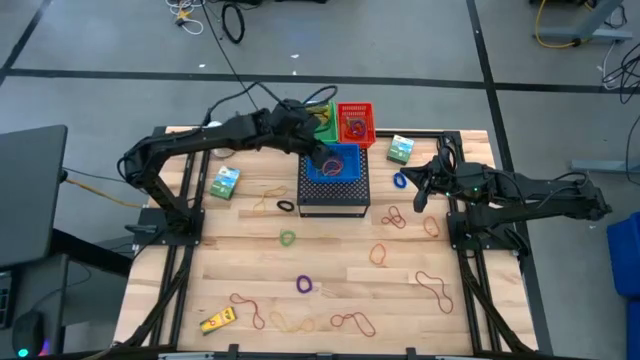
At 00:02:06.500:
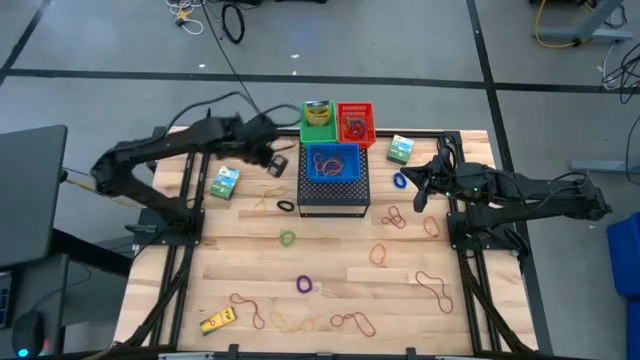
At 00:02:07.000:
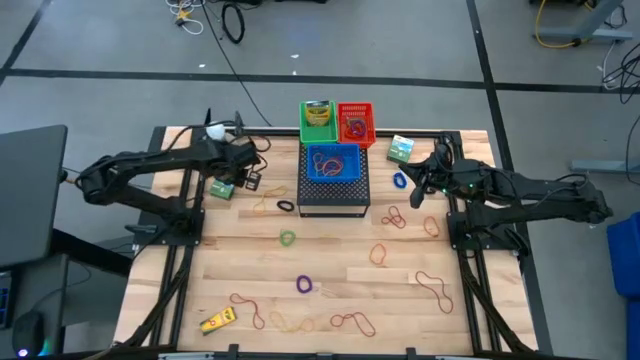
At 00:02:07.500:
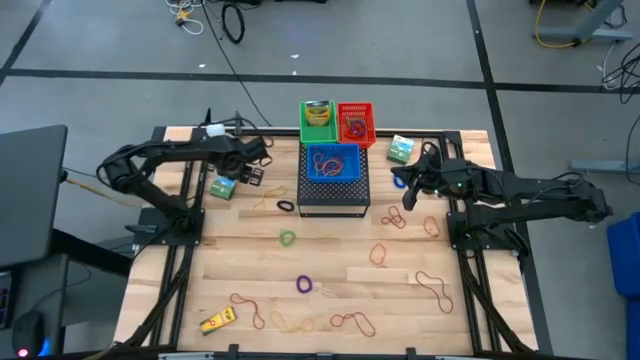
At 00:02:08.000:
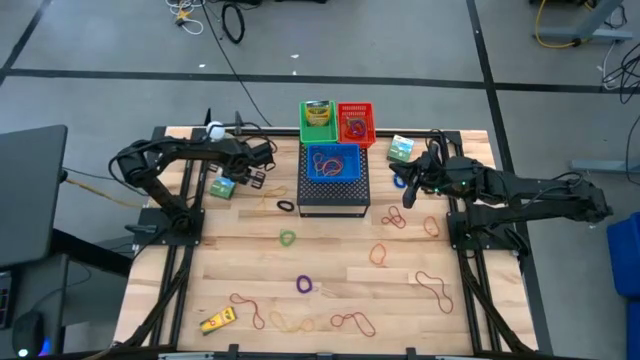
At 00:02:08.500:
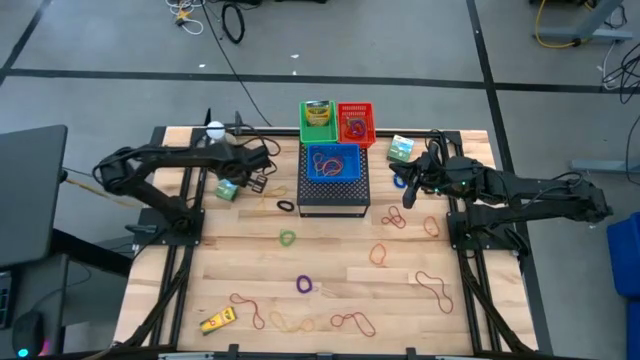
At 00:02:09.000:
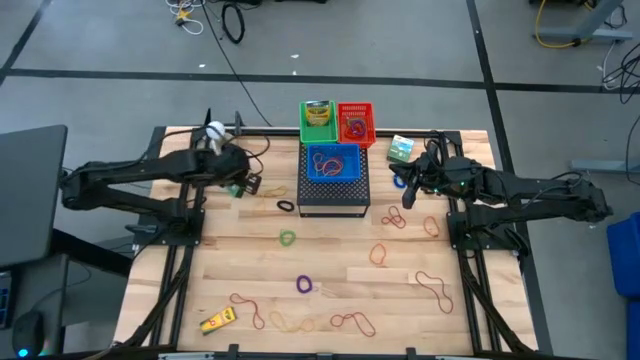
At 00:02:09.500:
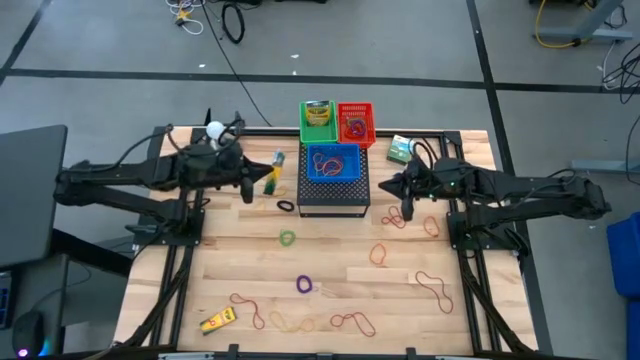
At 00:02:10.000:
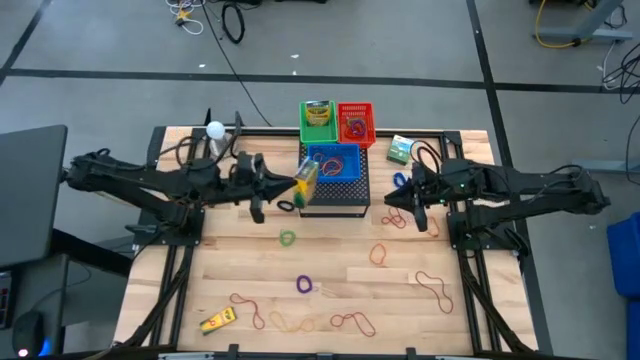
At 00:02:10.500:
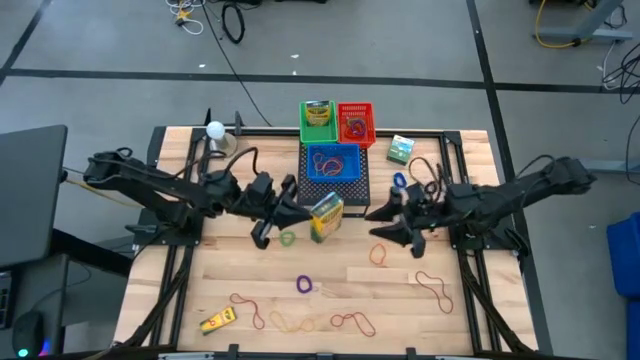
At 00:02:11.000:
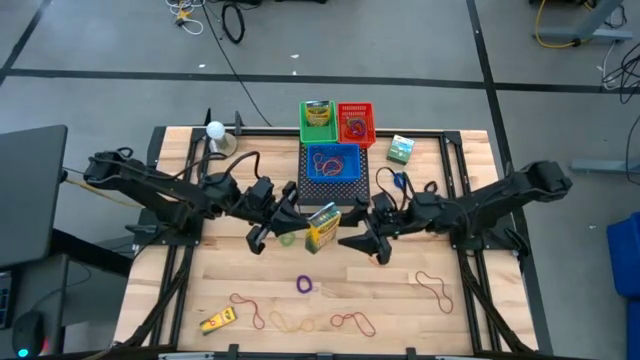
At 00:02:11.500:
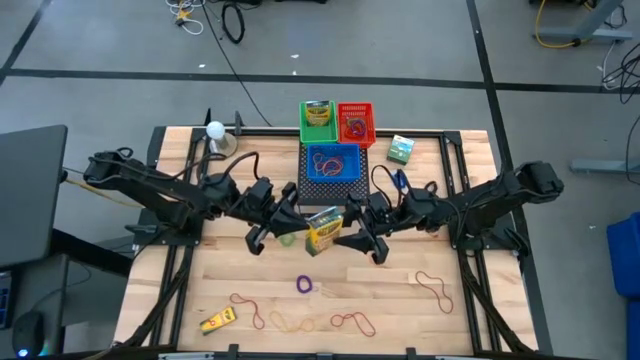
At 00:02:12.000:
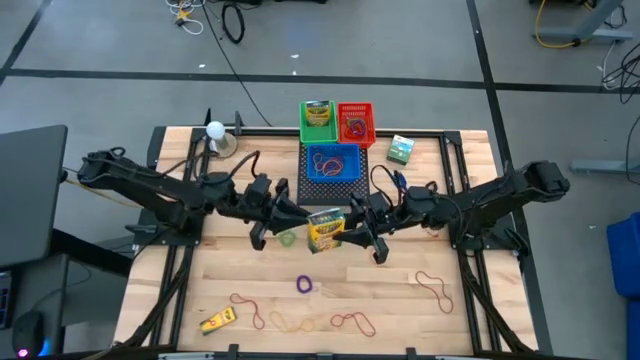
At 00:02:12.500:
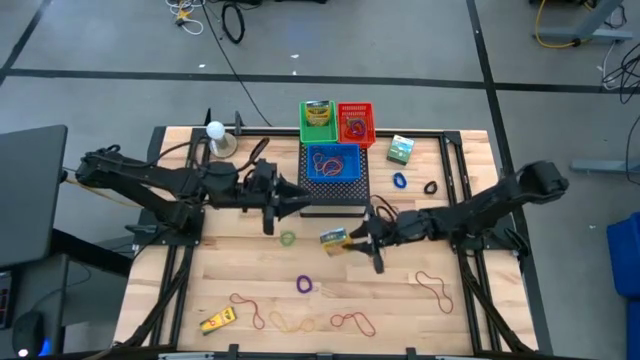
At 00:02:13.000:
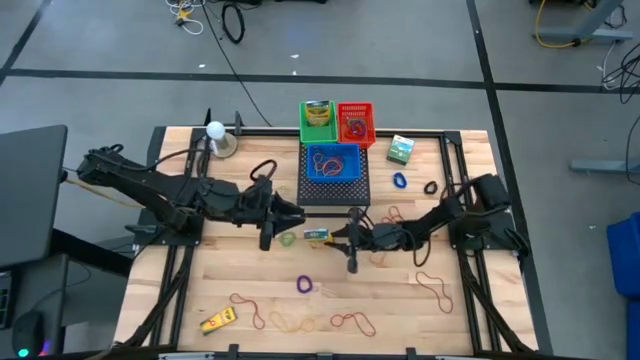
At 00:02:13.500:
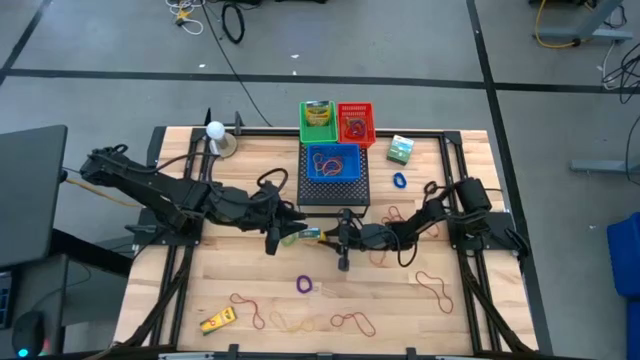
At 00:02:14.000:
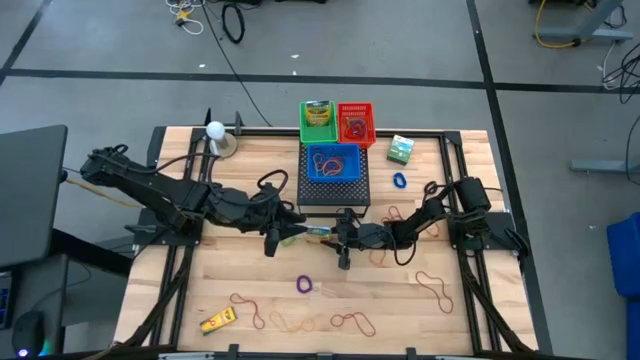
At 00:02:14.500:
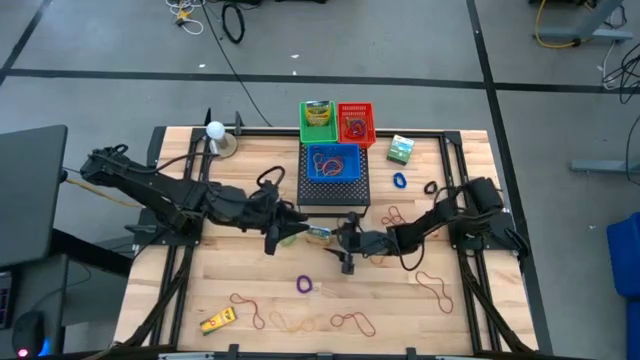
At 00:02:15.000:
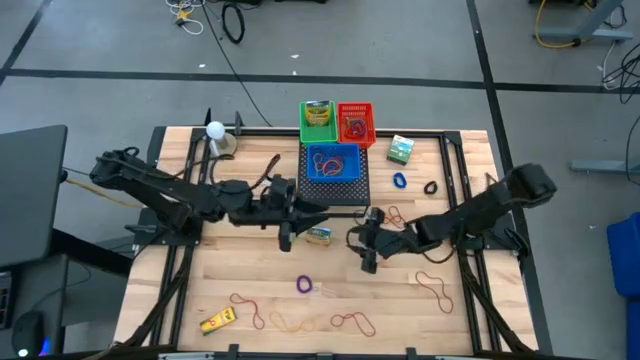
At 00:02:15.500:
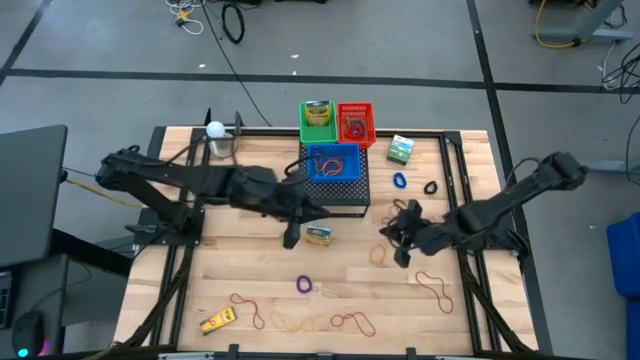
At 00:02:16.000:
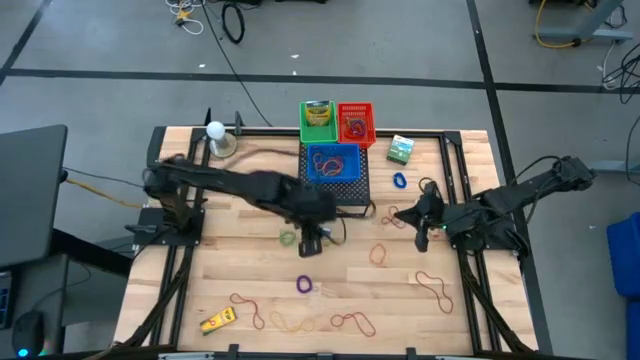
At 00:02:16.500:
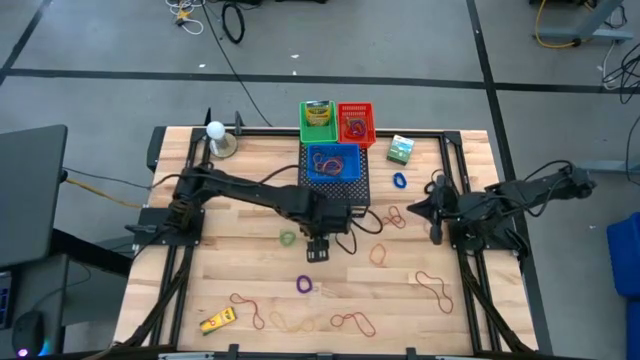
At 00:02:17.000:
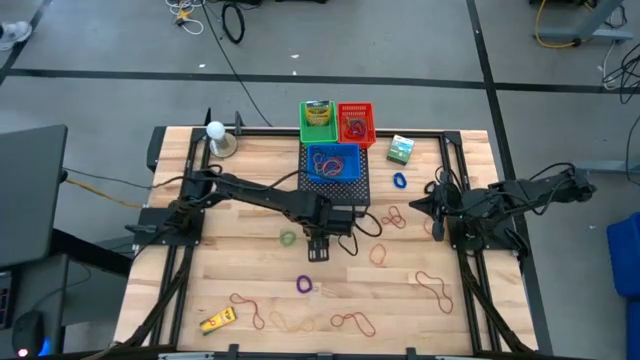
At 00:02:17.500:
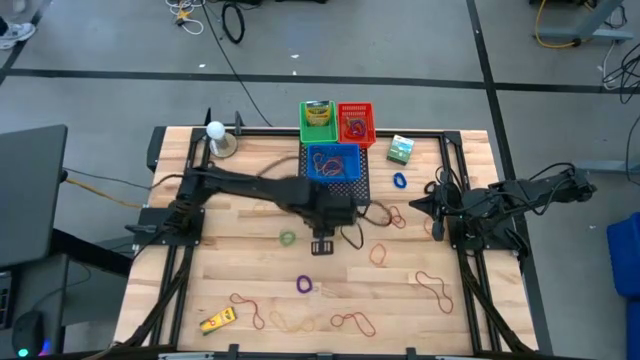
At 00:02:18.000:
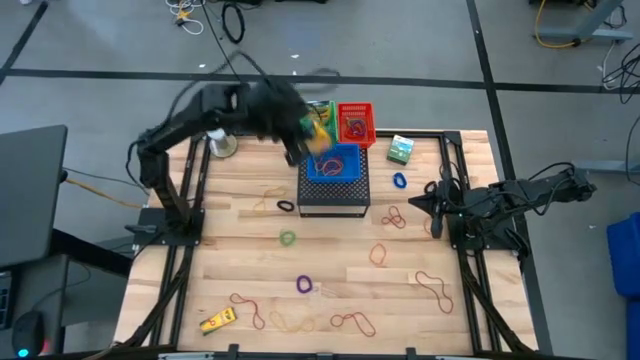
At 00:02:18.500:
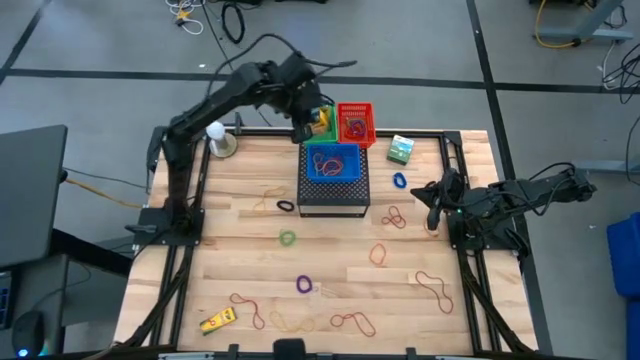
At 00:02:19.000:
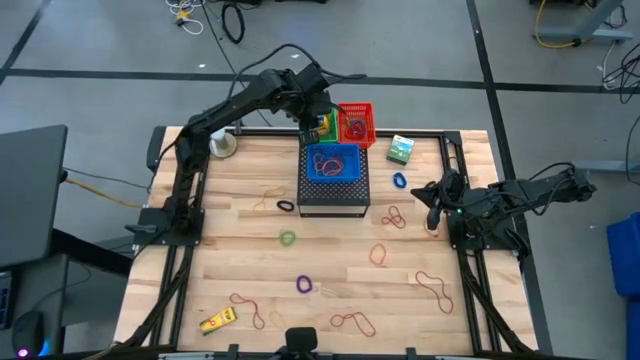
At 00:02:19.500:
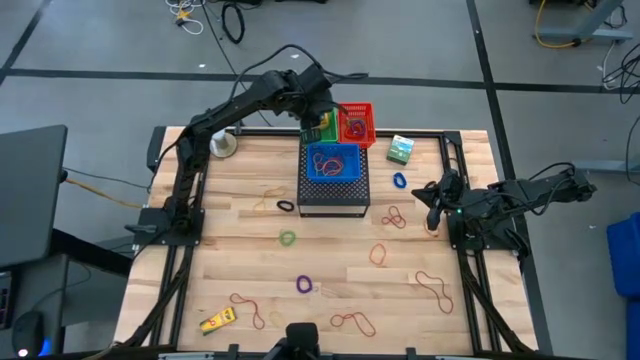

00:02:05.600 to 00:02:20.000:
Task: Pick & Place Office Desk Supplies
Put the box of crayon into the green bin on the shelf

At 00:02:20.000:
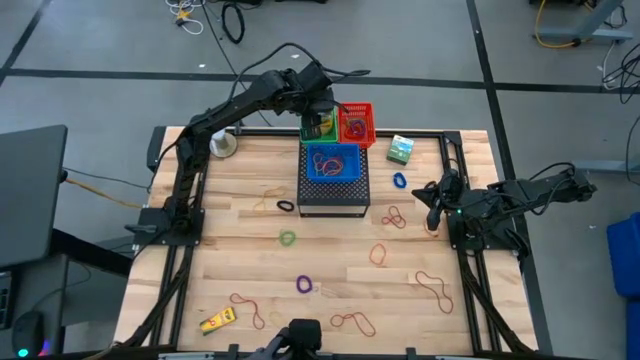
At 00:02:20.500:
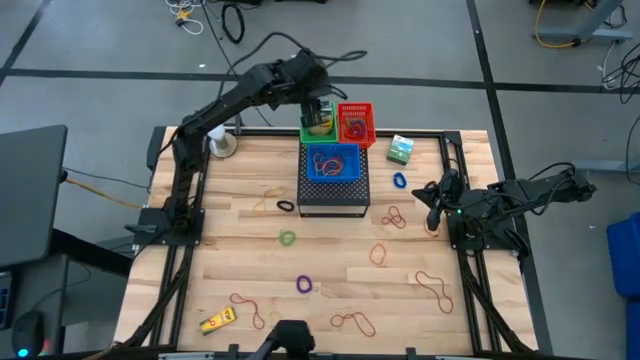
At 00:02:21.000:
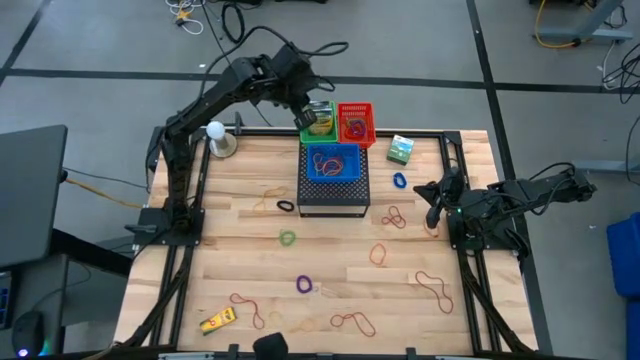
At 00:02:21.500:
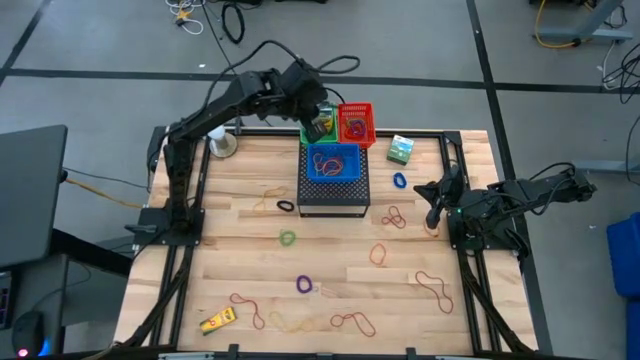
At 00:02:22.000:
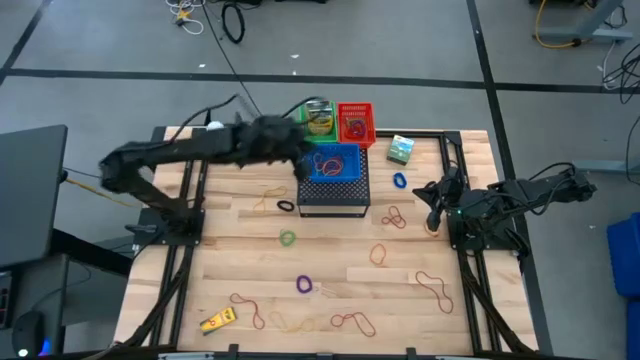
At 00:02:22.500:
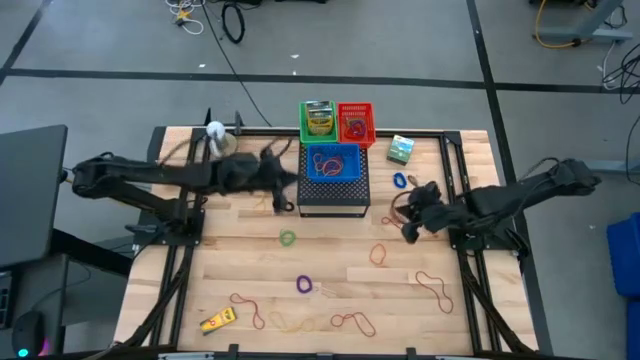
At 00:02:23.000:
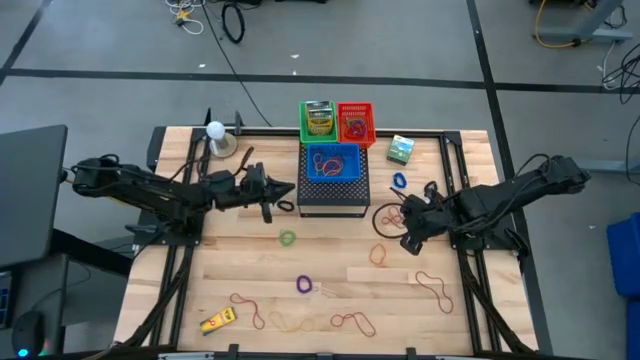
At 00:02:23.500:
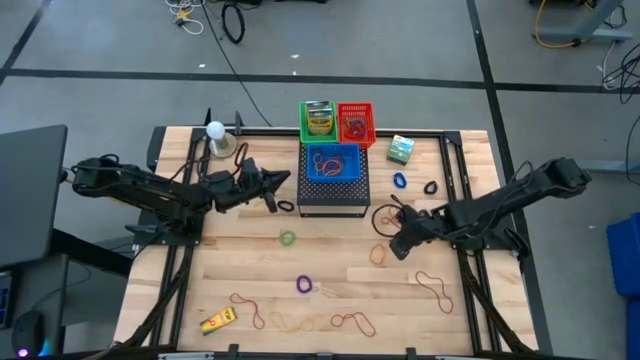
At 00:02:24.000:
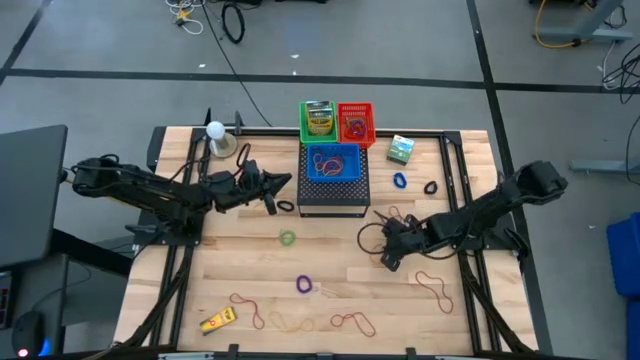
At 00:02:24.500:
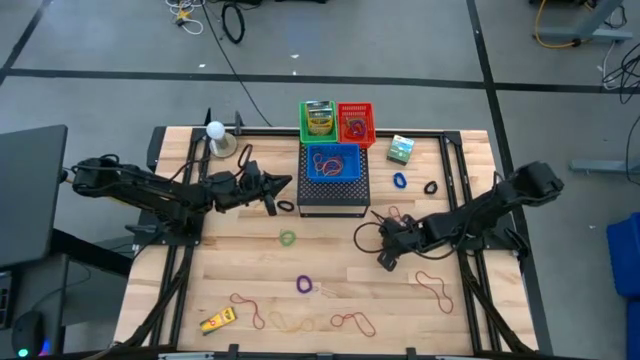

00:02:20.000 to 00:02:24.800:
Put the orange rubber band into the blue bin on the shelf

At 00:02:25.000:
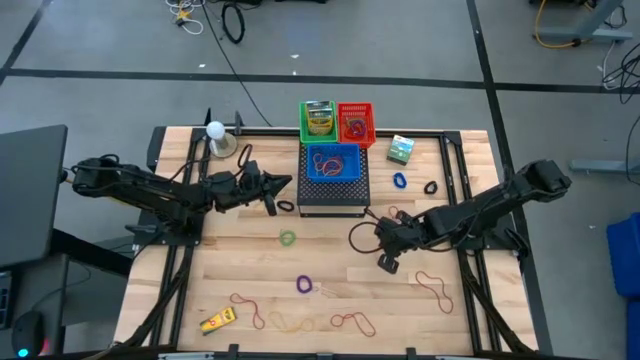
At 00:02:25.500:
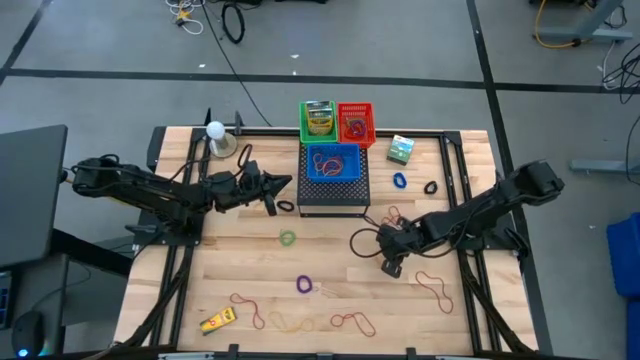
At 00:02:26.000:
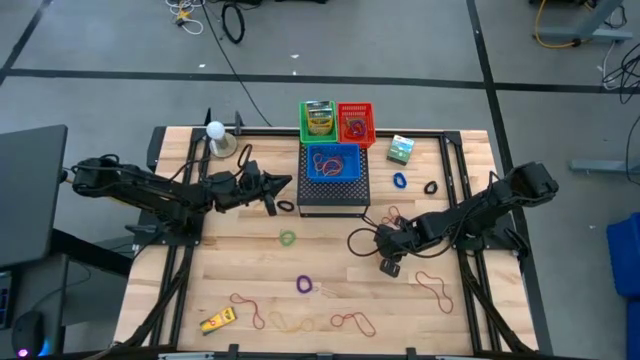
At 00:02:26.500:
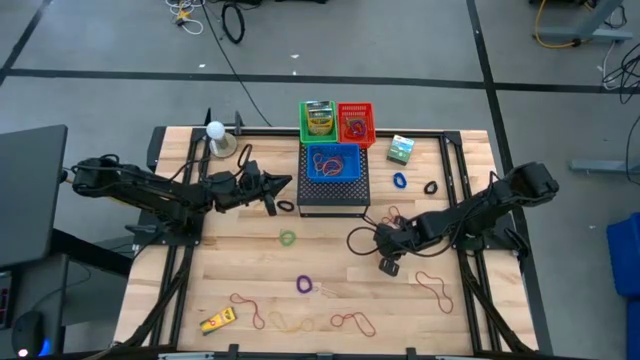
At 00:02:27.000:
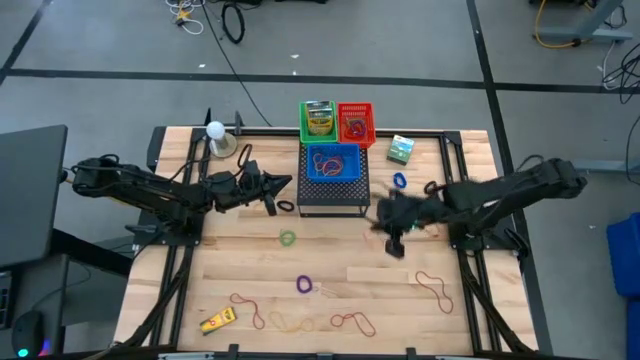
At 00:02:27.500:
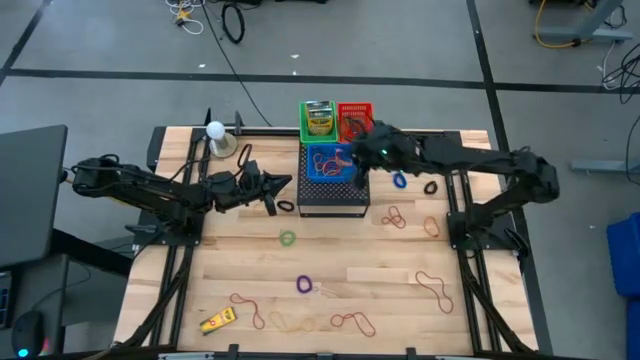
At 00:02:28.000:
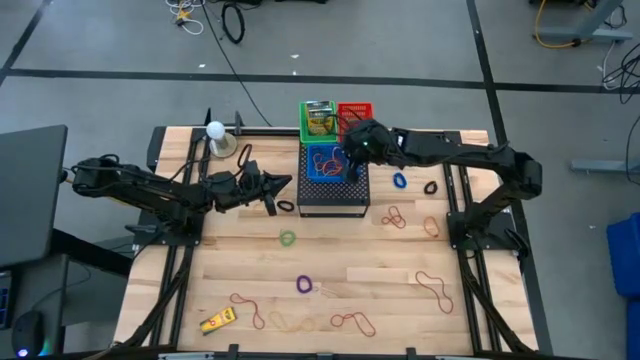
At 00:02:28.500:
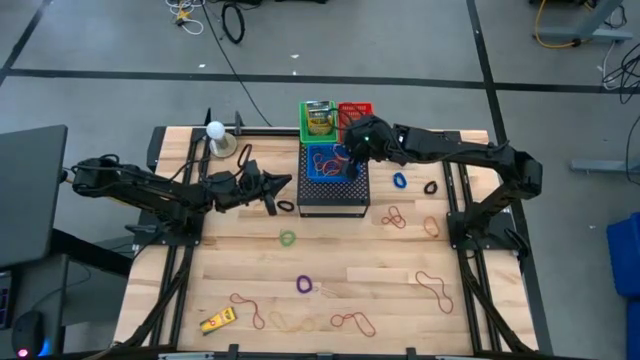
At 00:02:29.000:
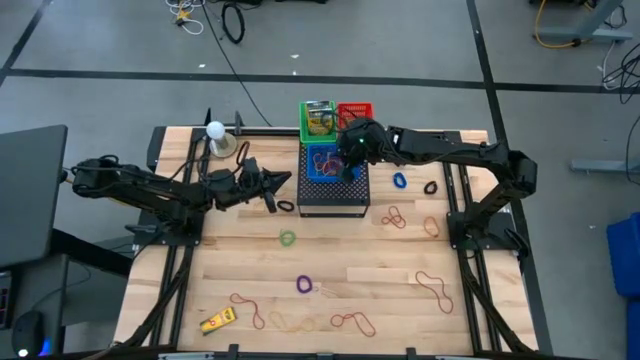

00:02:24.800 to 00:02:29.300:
Put the orange rubber band into the blue bin on the shelf
